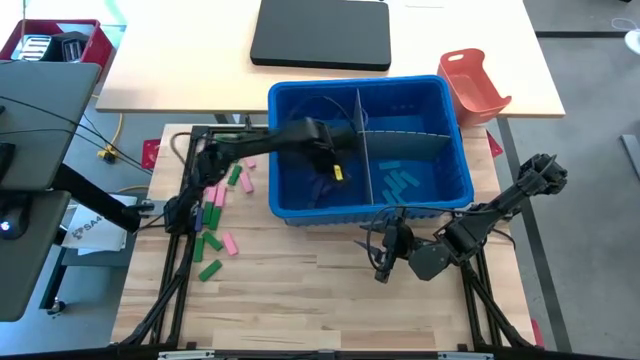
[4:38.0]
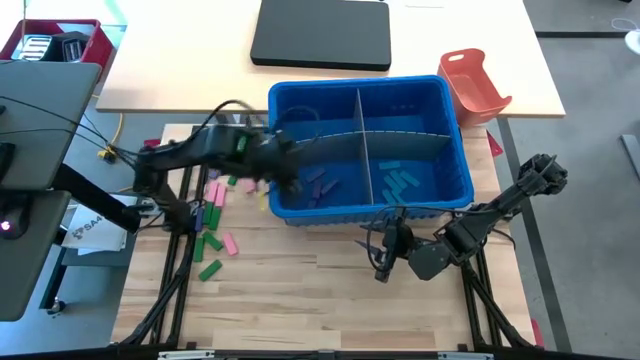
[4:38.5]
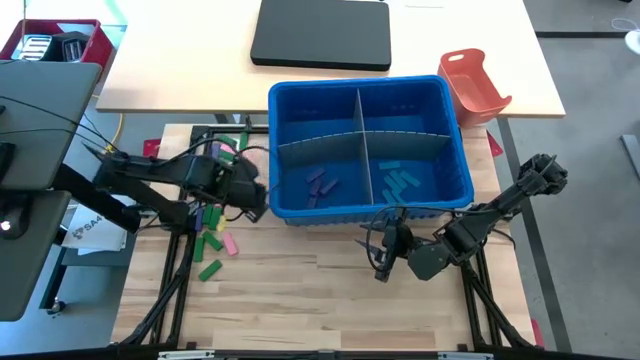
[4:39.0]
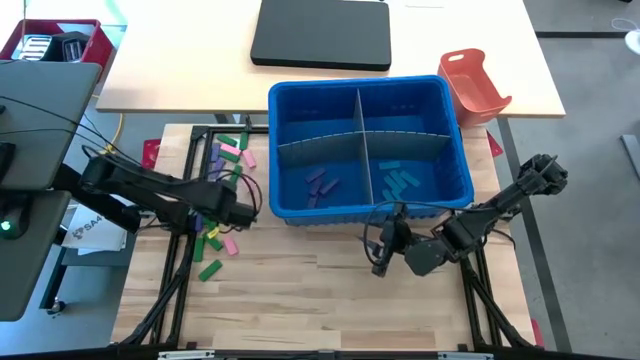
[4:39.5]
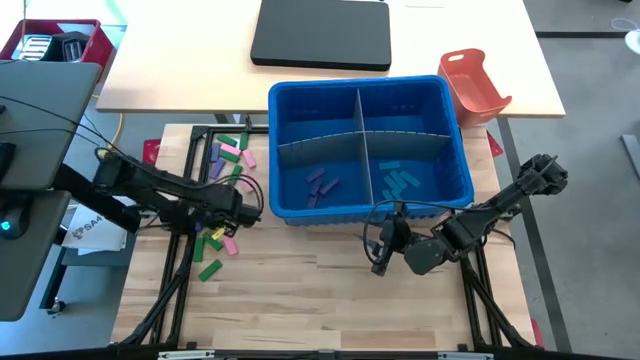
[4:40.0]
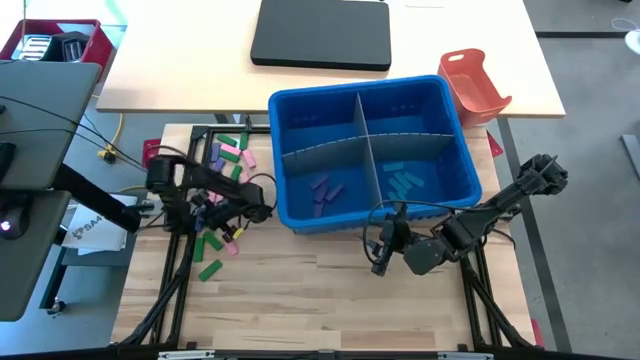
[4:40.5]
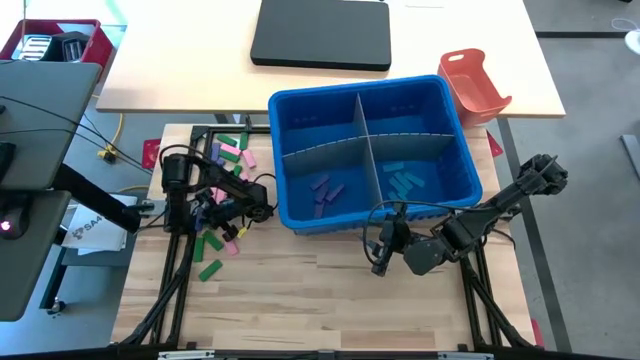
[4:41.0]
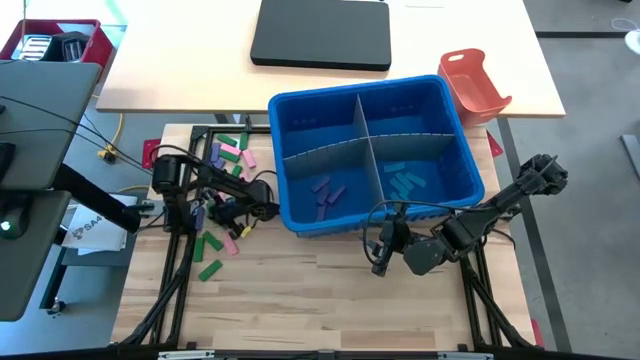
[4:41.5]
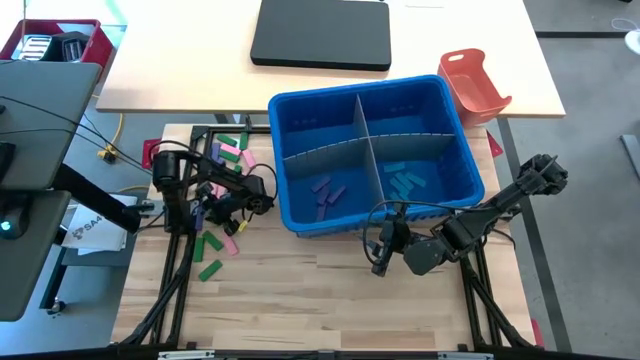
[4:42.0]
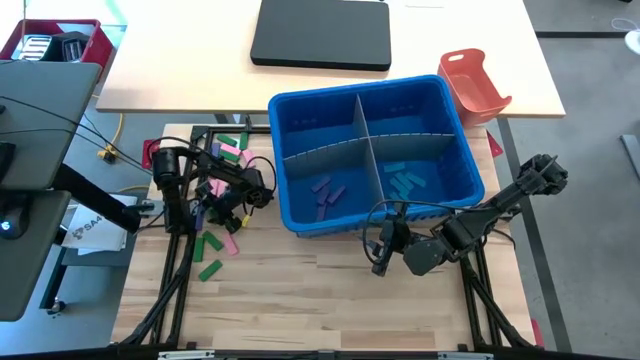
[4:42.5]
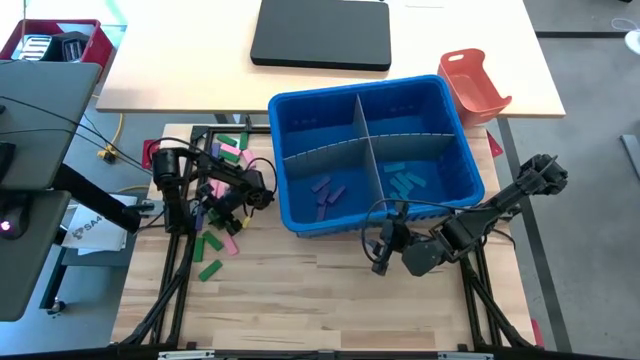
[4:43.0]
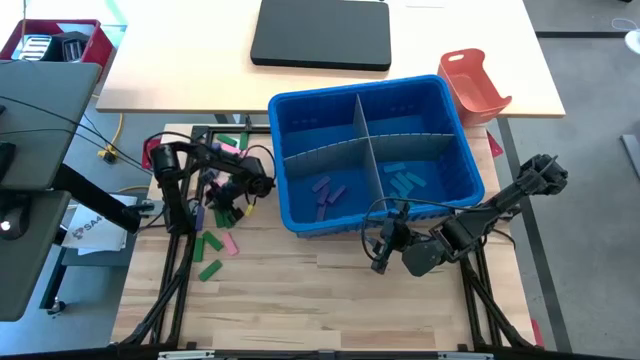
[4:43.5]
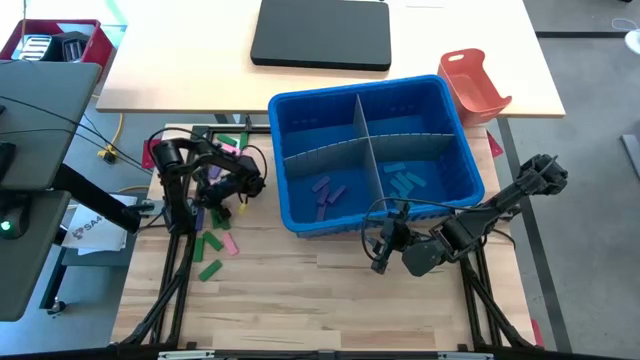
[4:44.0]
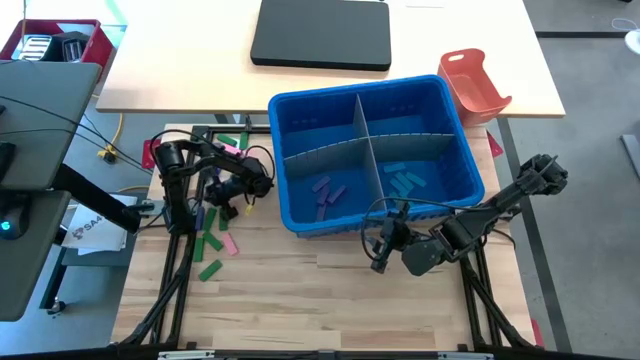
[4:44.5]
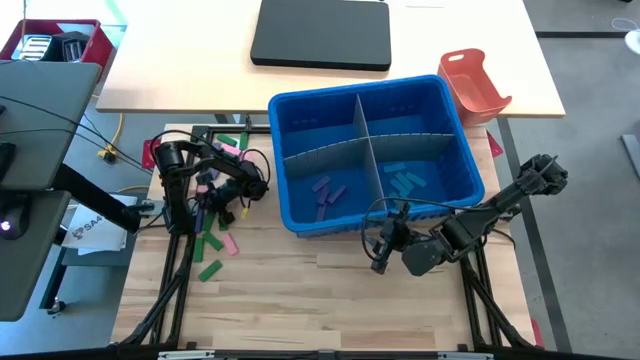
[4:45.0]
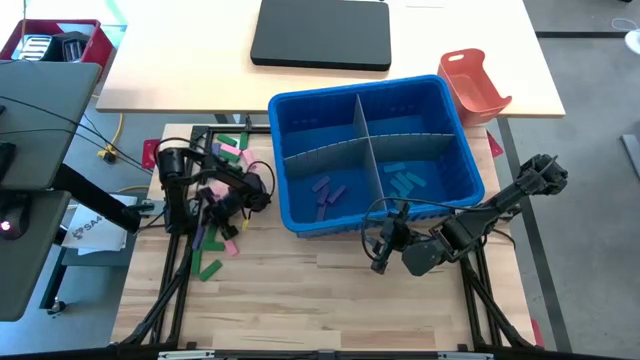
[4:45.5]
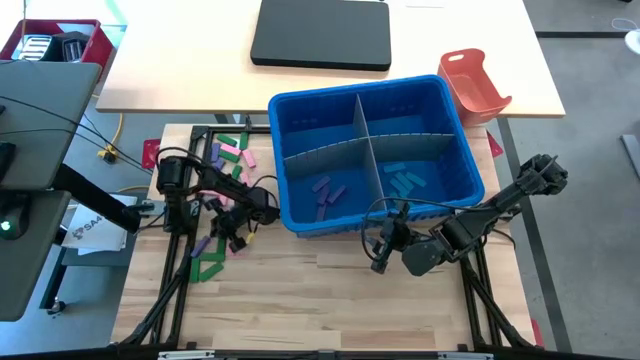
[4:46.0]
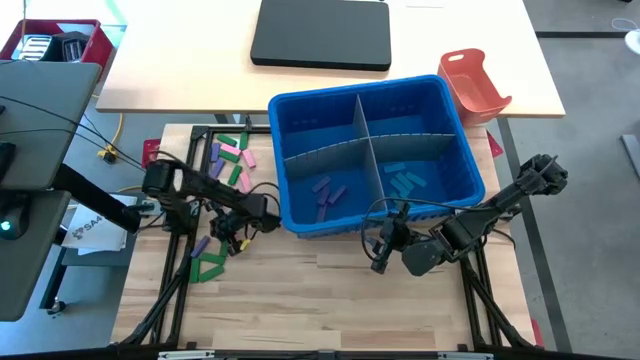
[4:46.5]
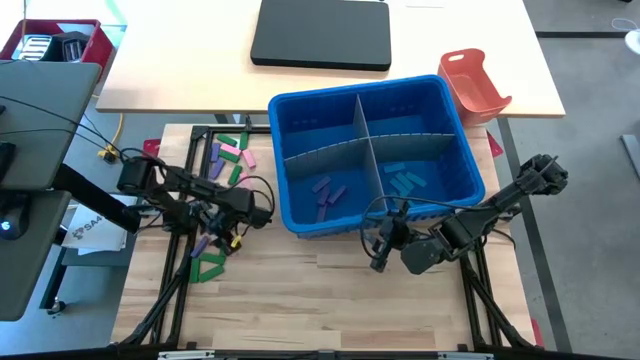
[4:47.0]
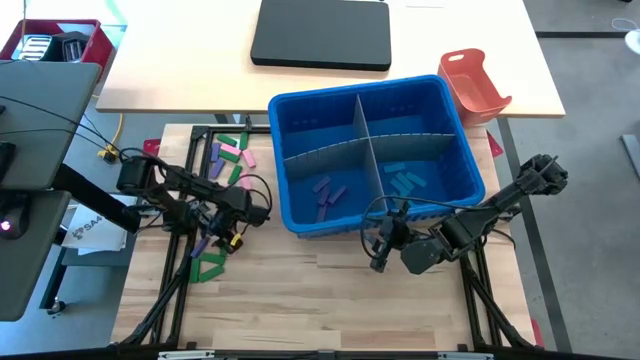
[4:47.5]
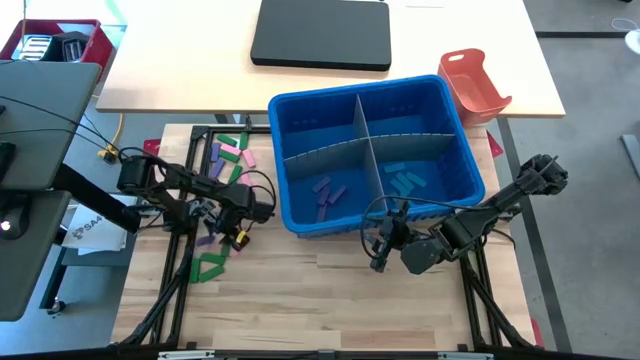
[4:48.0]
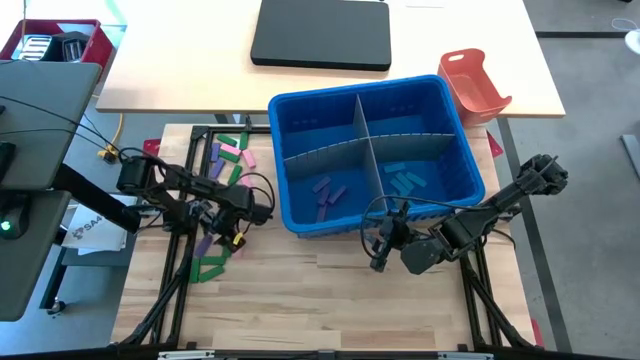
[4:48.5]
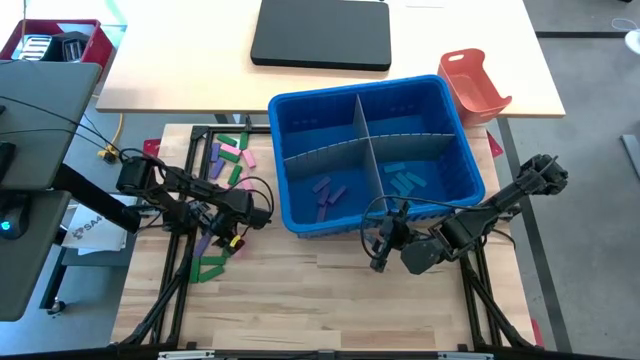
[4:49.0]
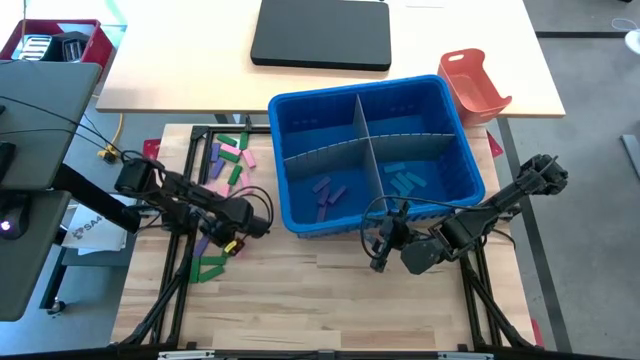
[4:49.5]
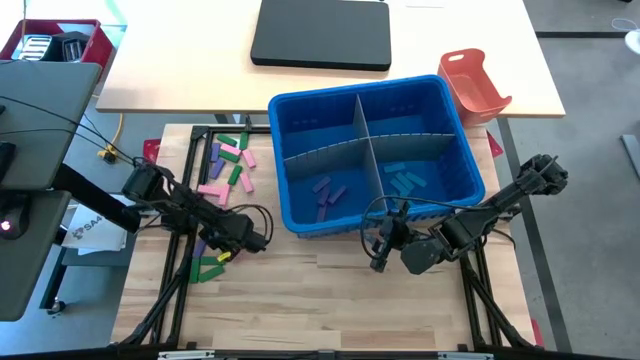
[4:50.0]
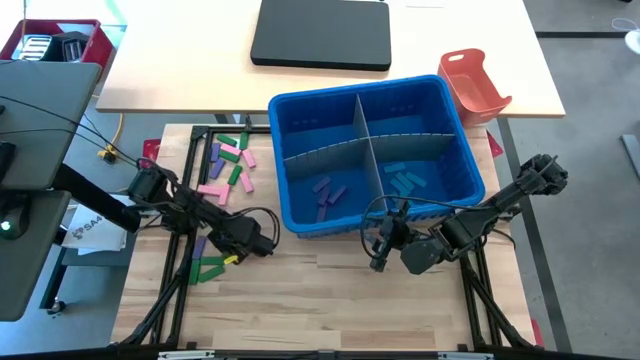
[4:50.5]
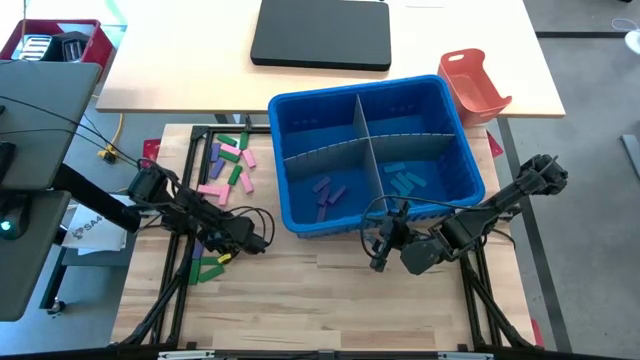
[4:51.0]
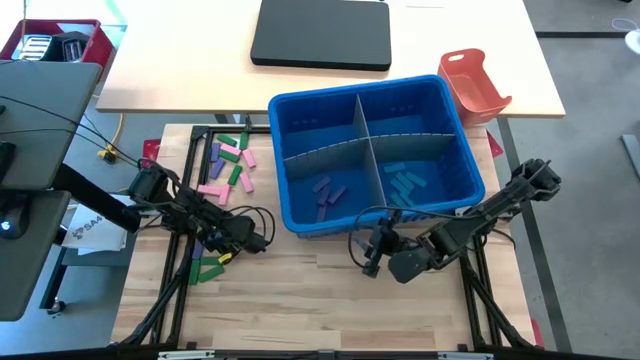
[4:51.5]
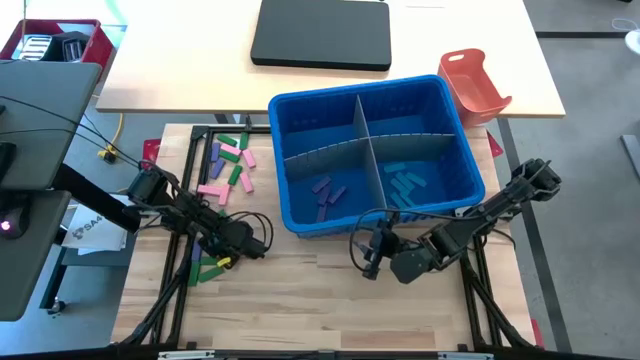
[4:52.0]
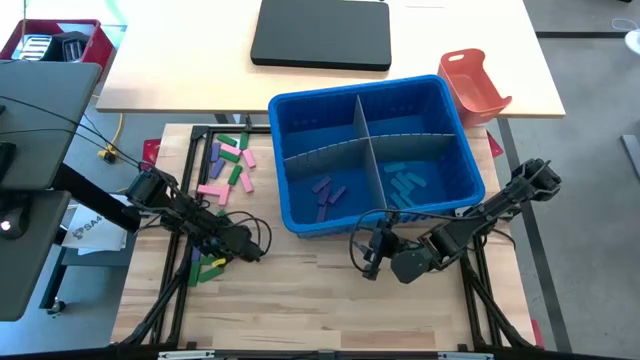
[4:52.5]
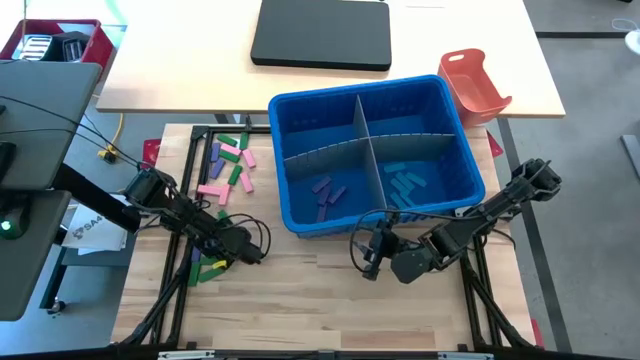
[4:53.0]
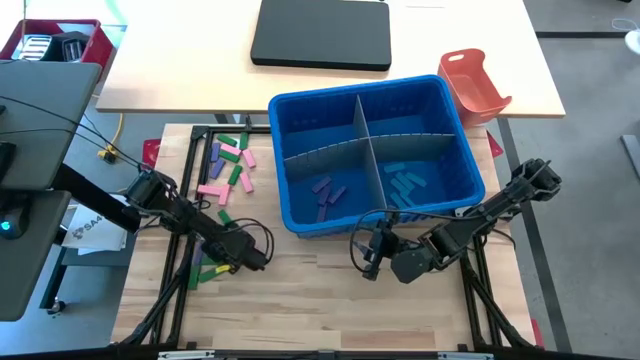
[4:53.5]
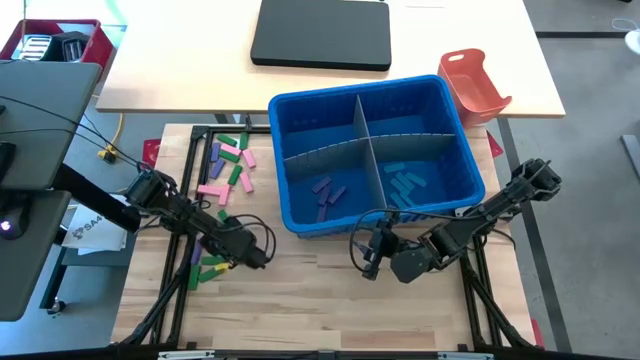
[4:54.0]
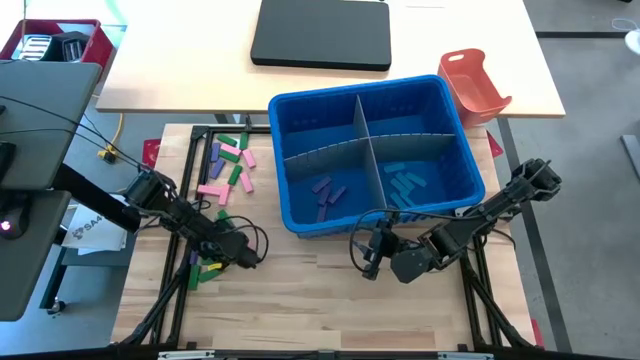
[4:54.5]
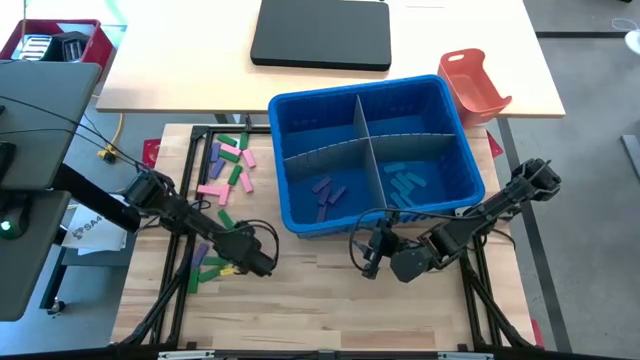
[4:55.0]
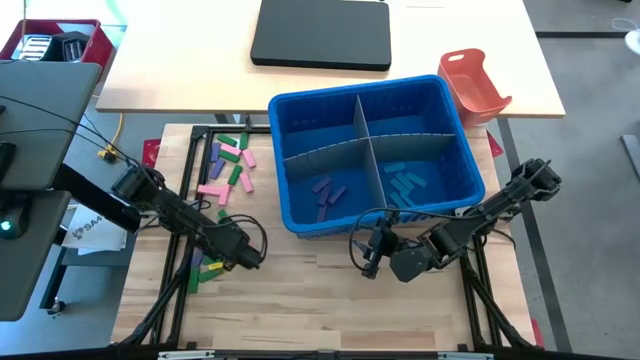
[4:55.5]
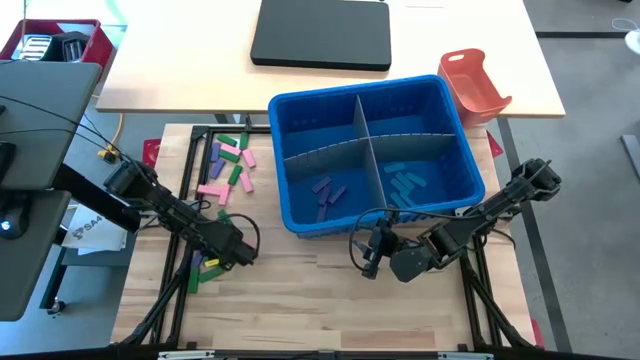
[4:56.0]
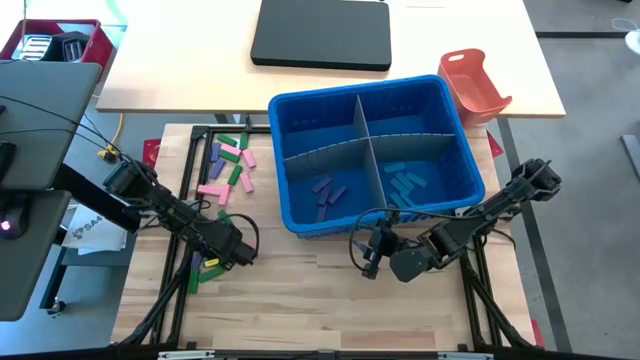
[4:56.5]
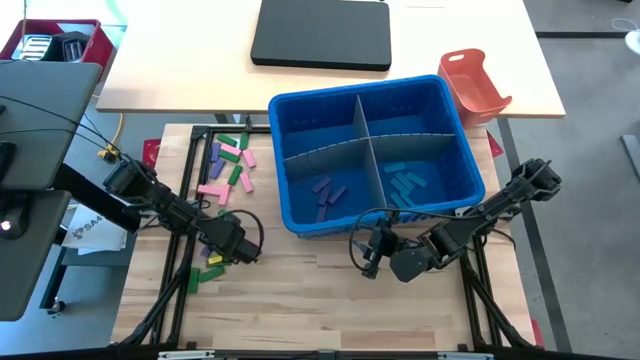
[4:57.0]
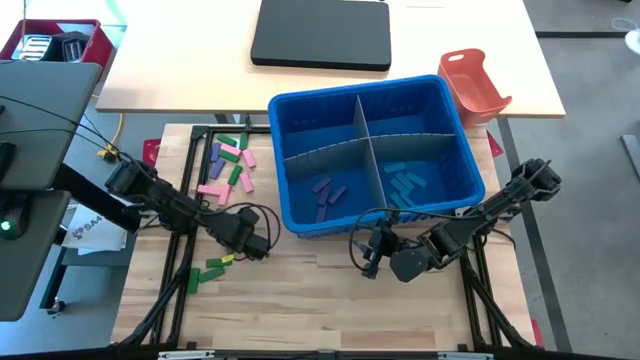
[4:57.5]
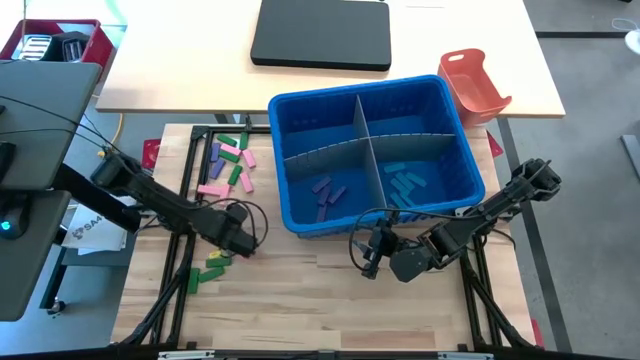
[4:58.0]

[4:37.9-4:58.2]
Task: Sort blocks
Put the purple block into the blue bin with the other purple block

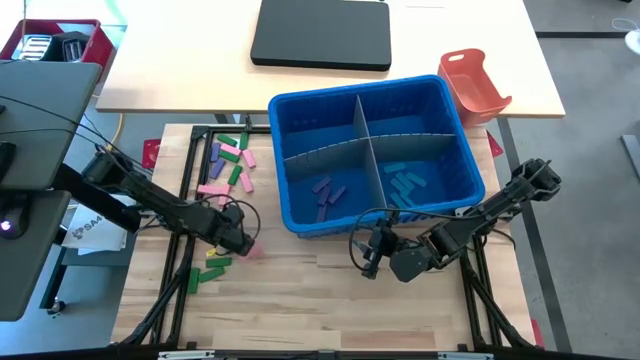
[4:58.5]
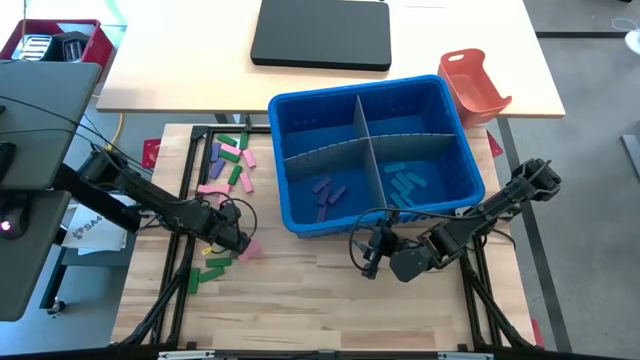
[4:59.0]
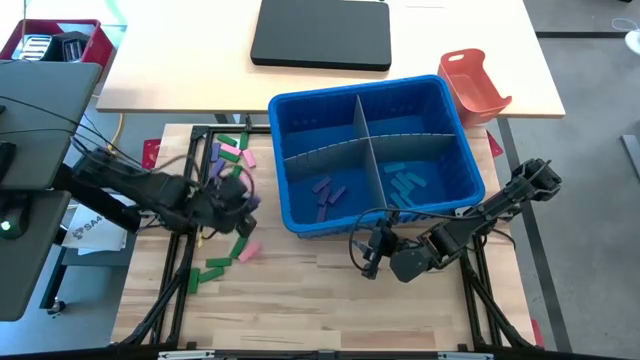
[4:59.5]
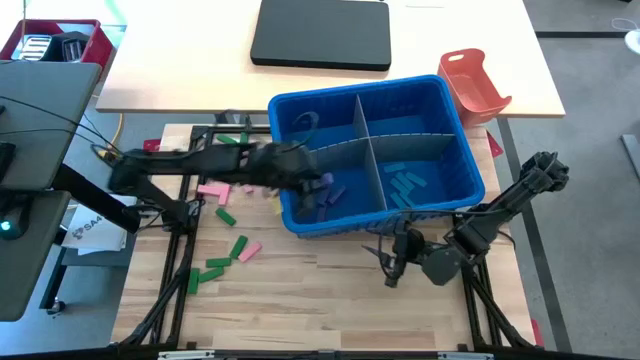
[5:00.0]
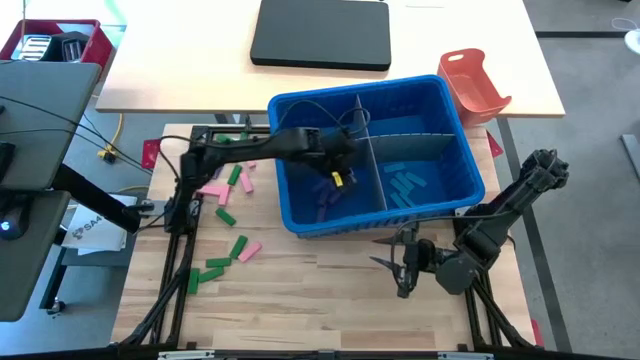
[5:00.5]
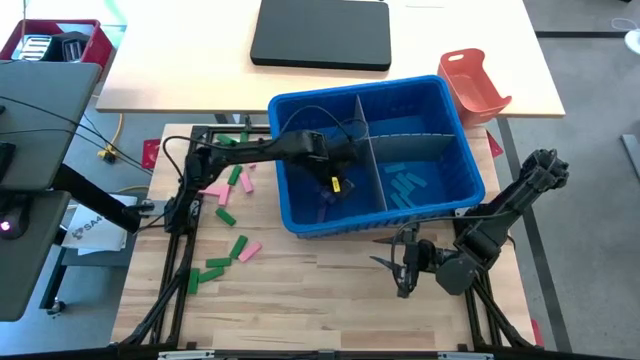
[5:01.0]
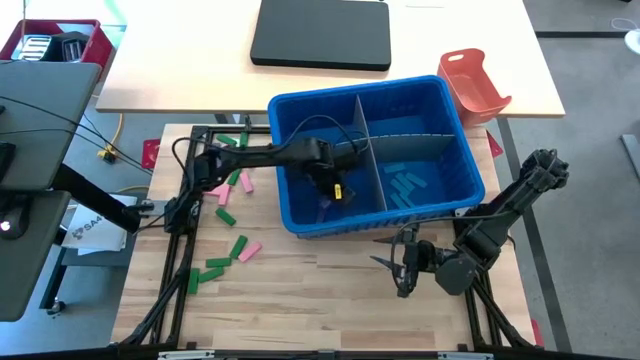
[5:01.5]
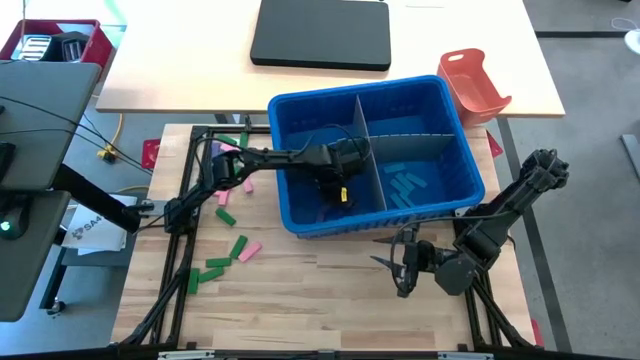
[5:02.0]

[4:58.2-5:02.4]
Put the purple block into the blue bin with the other purple block
